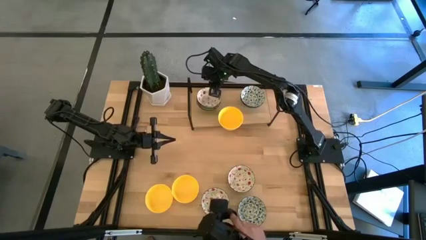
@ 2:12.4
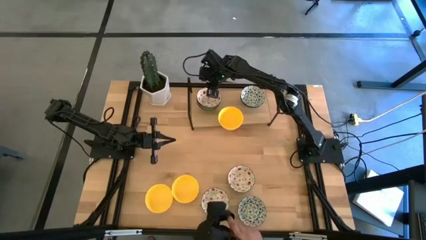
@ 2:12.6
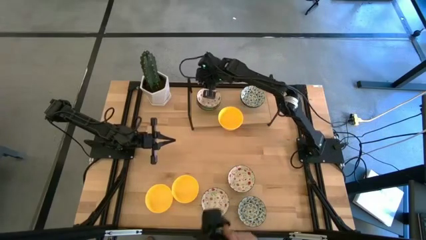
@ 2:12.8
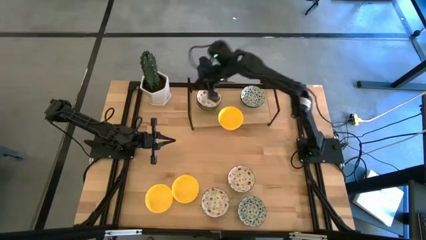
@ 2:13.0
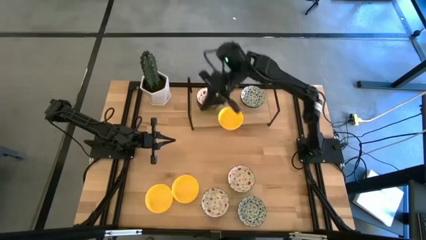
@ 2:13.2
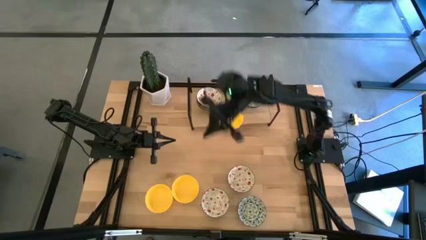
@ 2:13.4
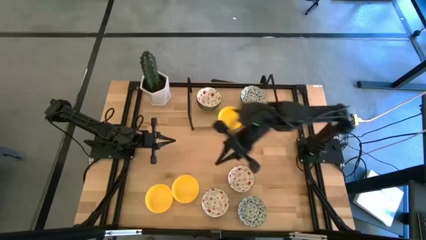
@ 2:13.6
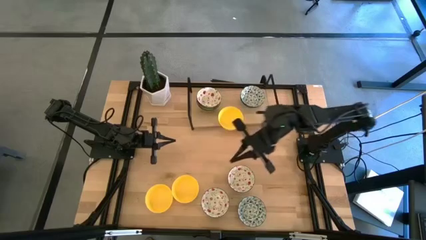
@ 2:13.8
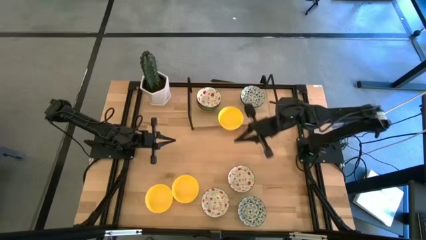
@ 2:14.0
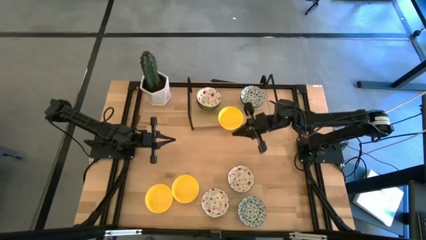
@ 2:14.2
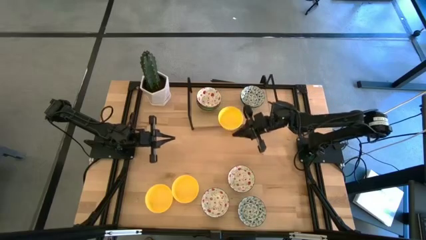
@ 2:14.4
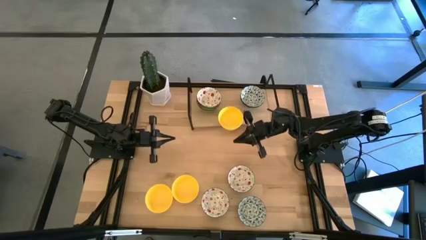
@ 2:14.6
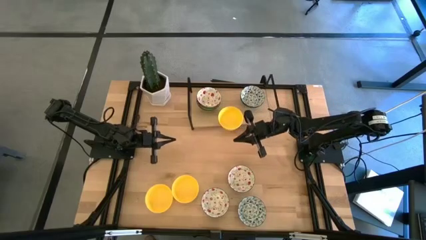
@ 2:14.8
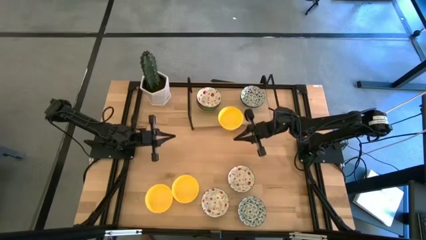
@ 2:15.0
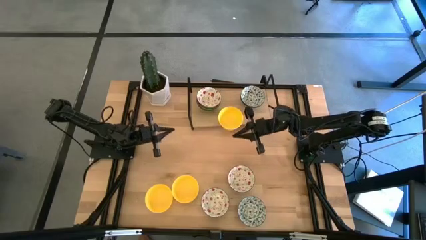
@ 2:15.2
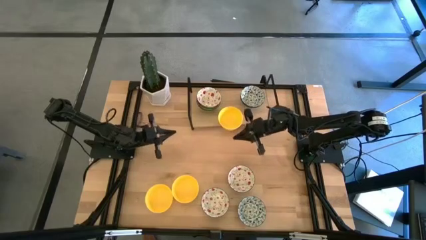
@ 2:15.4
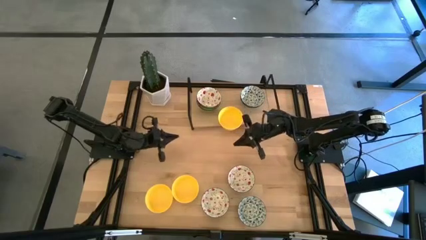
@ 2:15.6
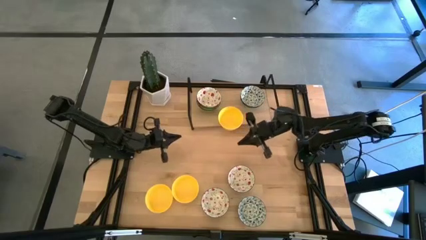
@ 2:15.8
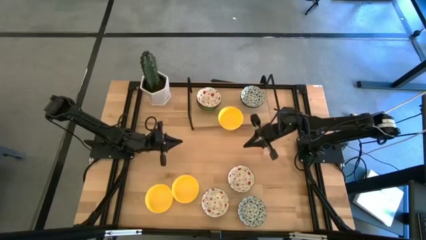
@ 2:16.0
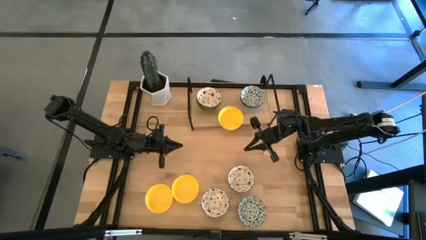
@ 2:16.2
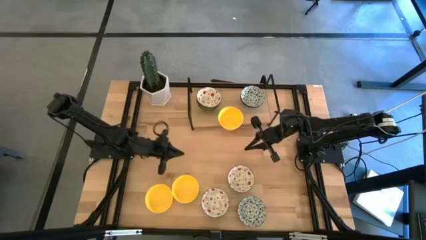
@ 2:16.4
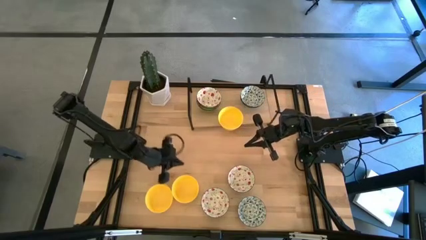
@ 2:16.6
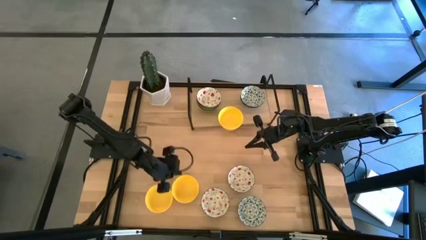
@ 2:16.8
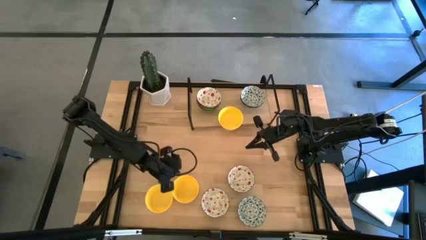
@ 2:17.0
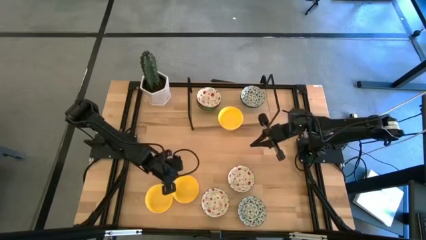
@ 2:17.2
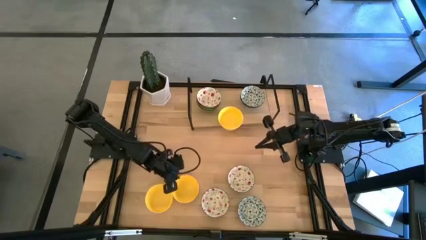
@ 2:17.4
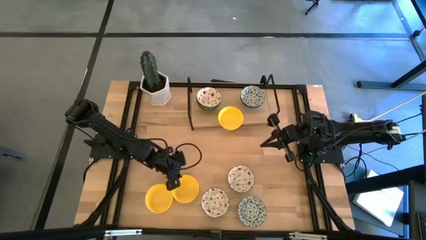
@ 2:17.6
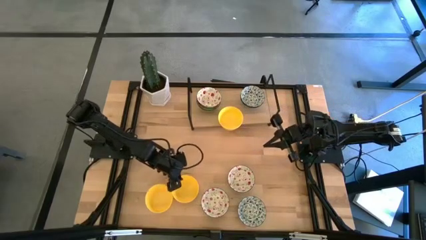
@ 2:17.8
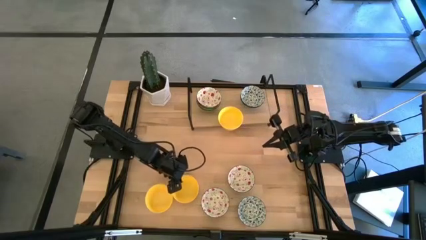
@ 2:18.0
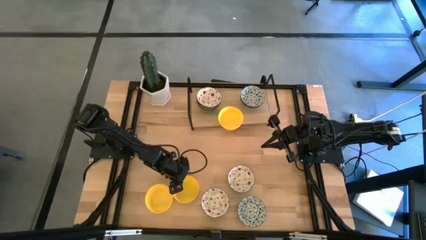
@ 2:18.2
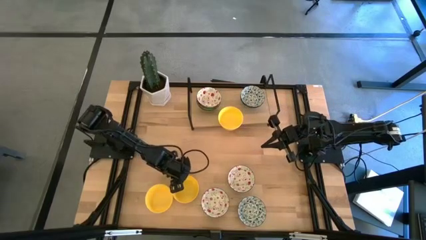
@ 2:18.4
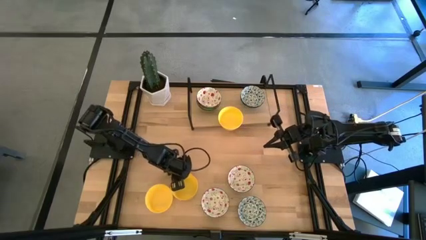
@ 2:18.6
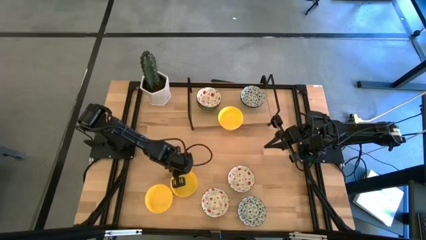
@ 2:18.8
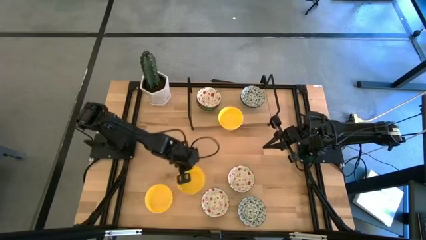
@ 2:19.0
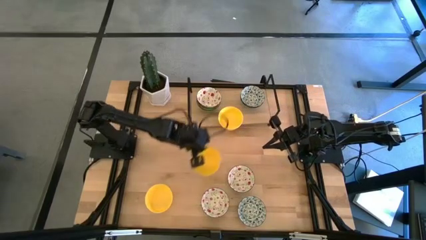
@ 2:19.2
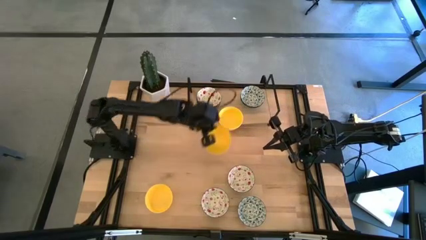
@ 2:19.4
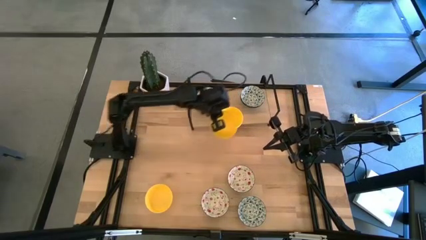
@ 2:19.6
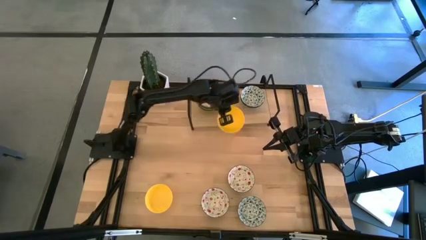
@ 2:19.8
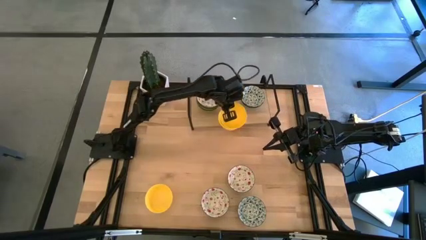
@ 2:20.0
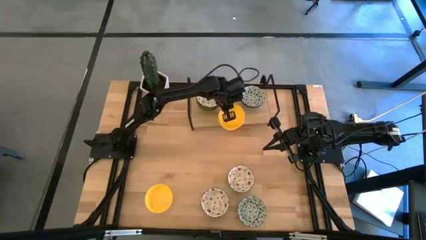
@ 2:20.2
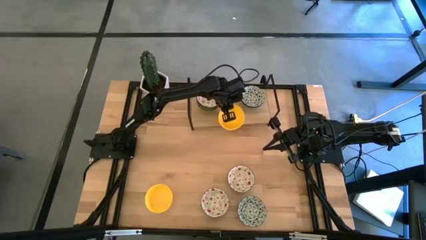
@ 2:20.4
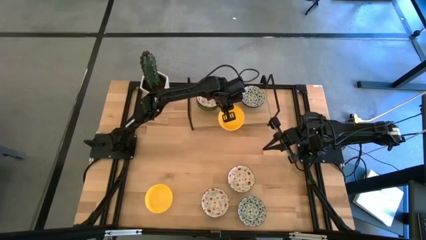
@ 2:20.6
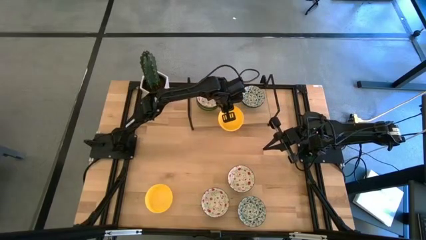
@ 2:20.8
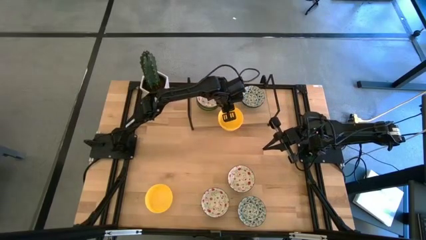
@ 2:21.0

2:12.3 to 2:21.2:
Task: Pick & Place Mini bowls
Stack the yellow bowl on top of the yellow bowl on the shelf
